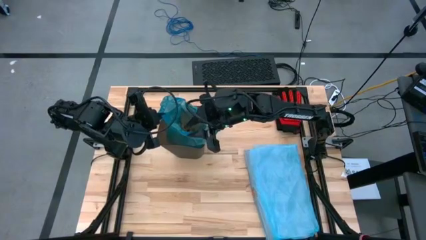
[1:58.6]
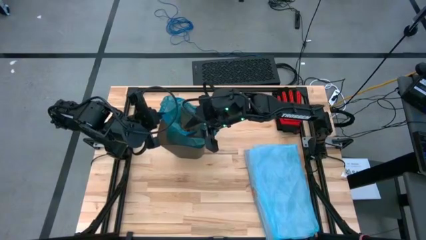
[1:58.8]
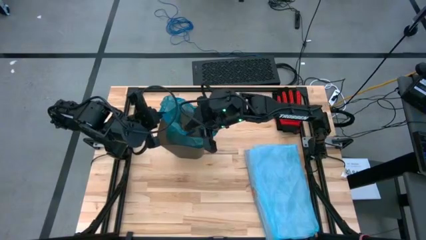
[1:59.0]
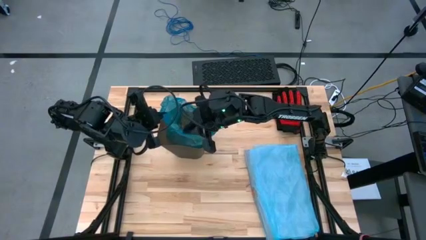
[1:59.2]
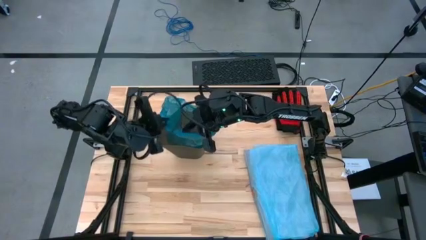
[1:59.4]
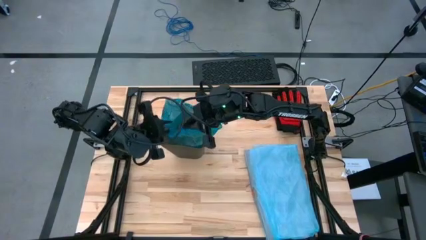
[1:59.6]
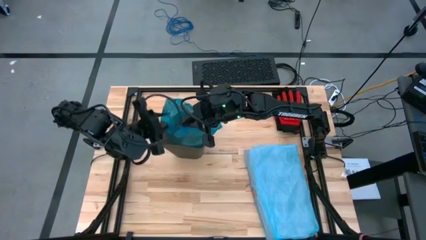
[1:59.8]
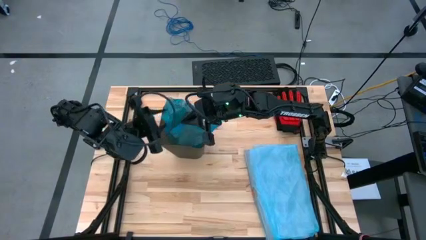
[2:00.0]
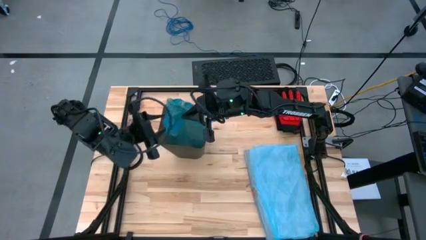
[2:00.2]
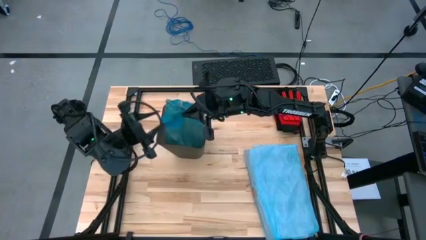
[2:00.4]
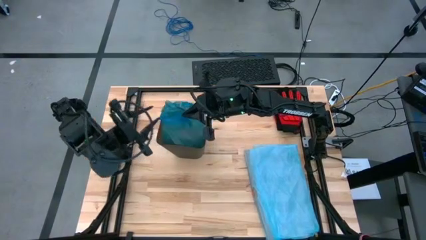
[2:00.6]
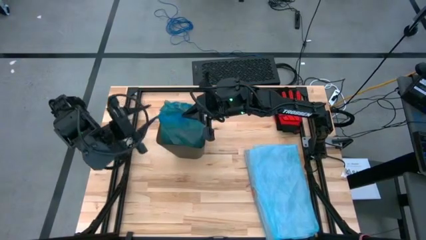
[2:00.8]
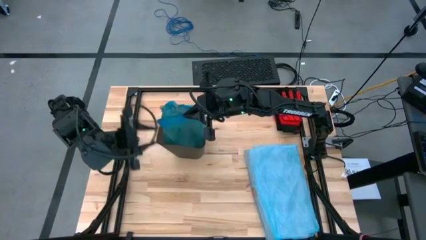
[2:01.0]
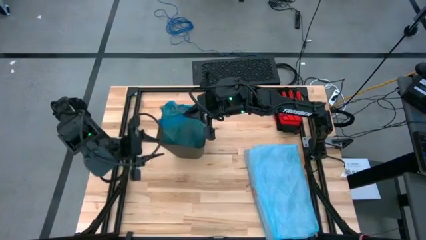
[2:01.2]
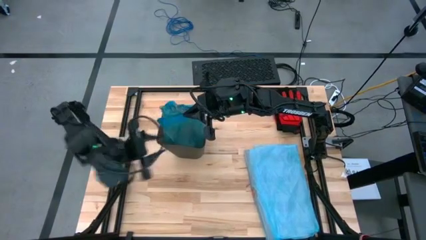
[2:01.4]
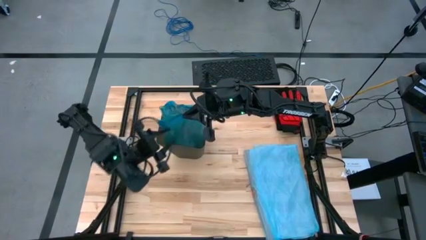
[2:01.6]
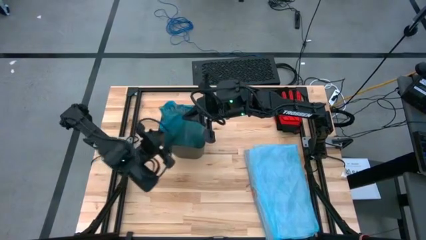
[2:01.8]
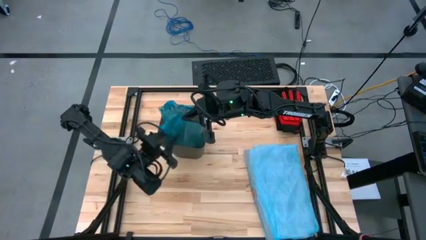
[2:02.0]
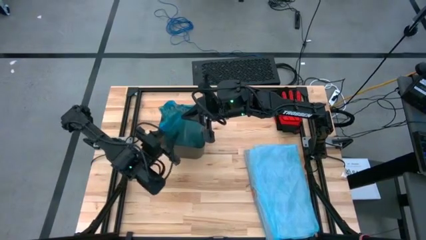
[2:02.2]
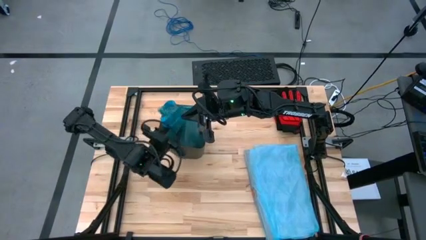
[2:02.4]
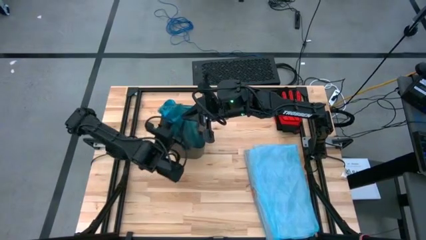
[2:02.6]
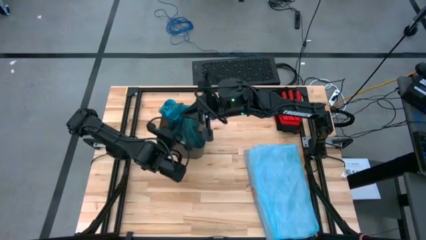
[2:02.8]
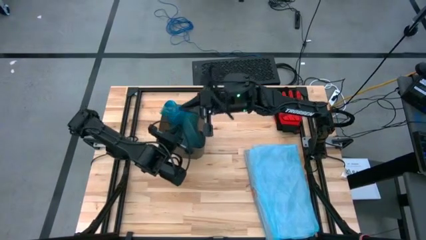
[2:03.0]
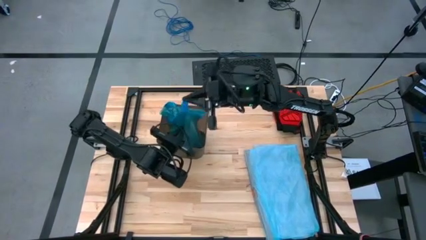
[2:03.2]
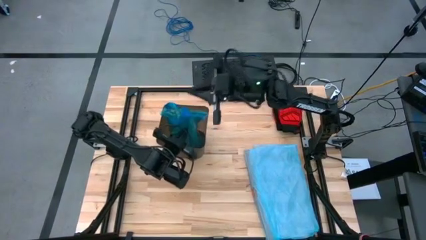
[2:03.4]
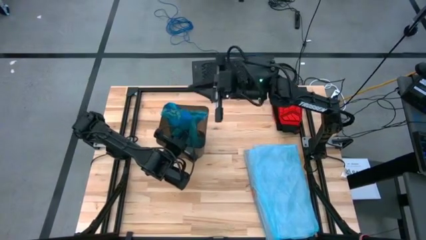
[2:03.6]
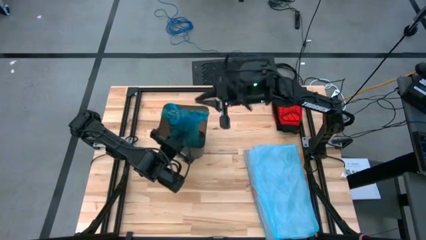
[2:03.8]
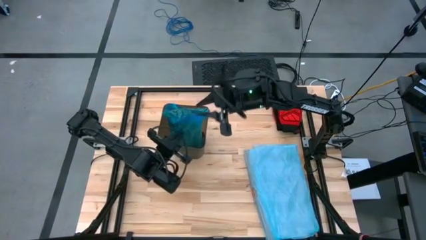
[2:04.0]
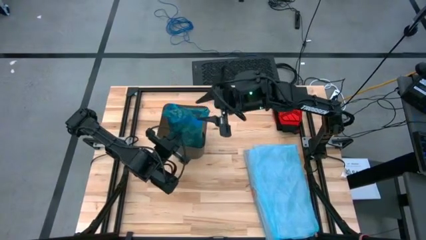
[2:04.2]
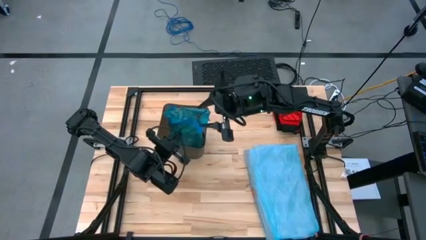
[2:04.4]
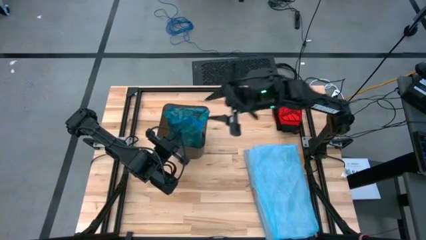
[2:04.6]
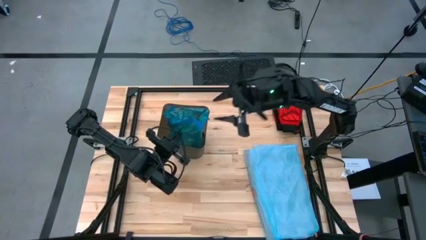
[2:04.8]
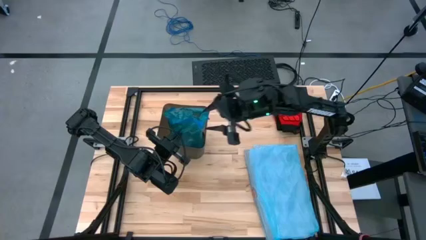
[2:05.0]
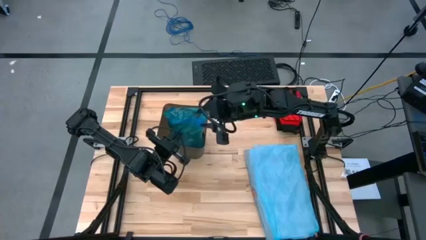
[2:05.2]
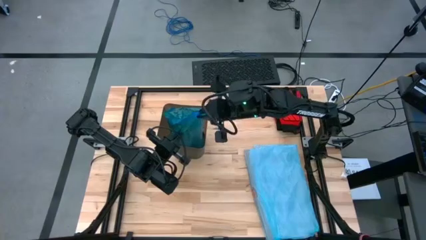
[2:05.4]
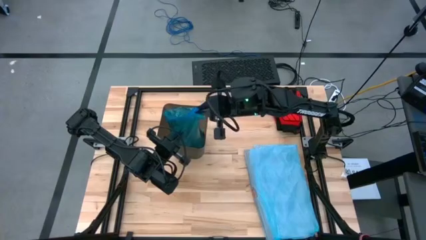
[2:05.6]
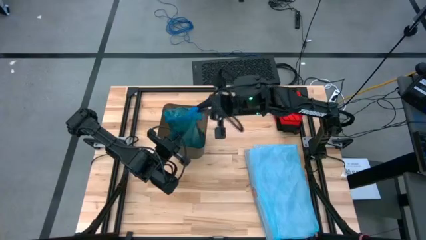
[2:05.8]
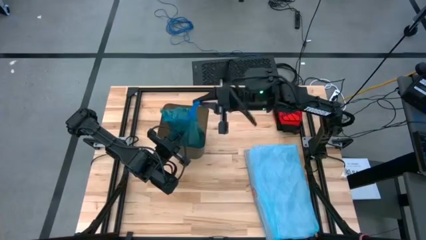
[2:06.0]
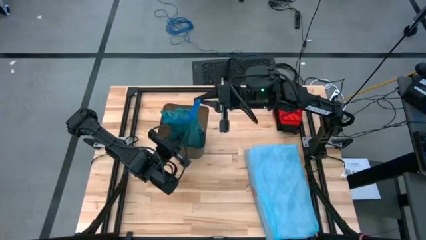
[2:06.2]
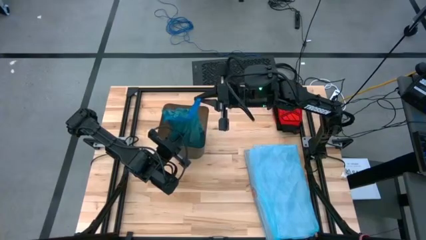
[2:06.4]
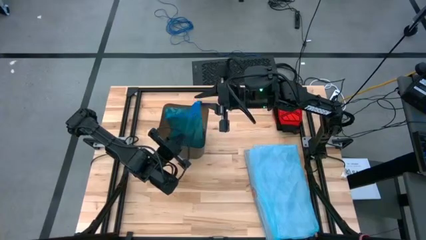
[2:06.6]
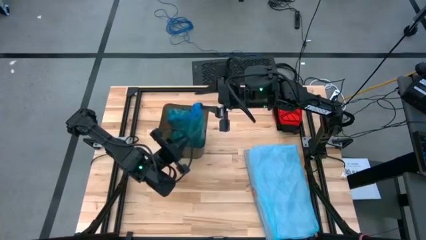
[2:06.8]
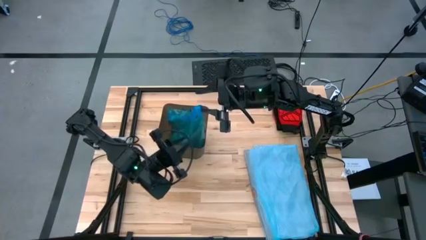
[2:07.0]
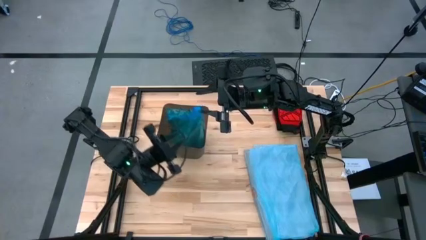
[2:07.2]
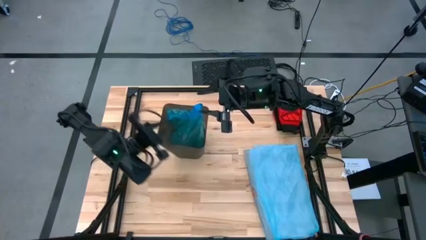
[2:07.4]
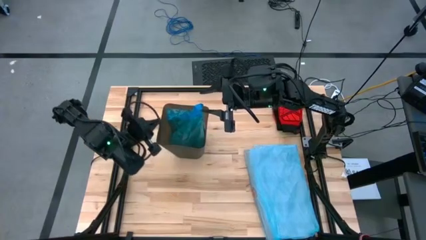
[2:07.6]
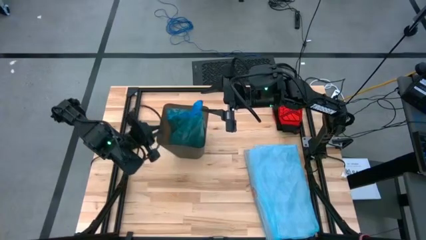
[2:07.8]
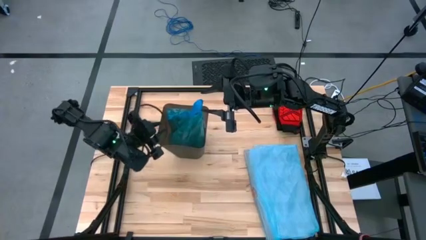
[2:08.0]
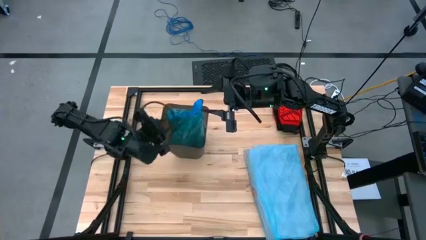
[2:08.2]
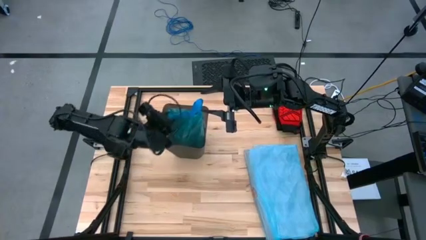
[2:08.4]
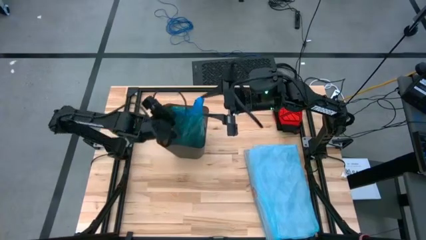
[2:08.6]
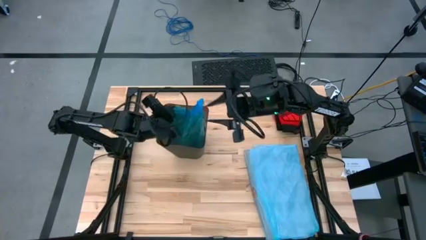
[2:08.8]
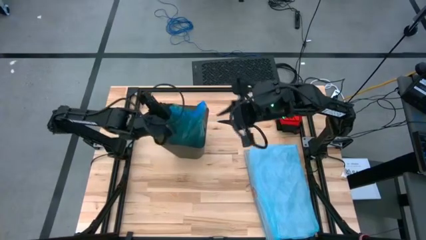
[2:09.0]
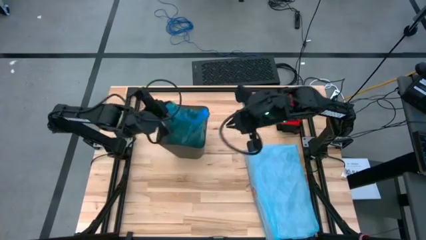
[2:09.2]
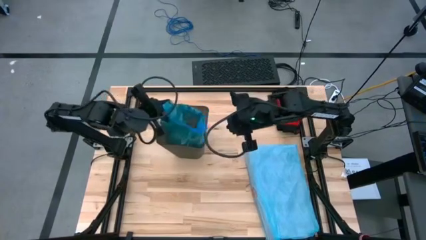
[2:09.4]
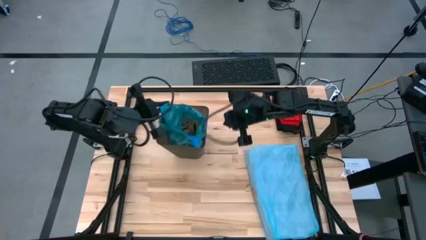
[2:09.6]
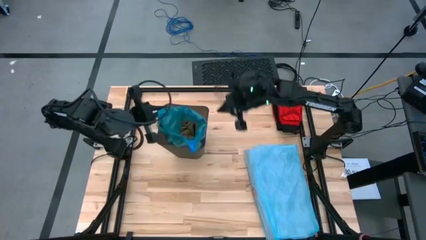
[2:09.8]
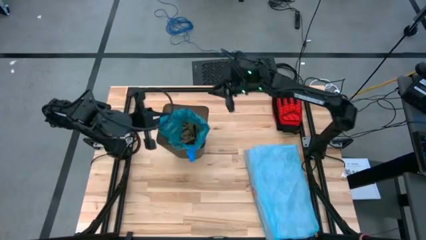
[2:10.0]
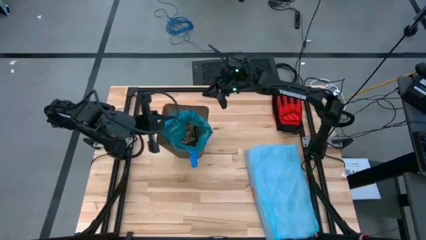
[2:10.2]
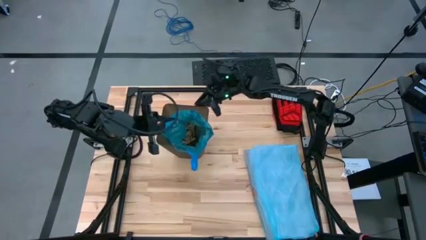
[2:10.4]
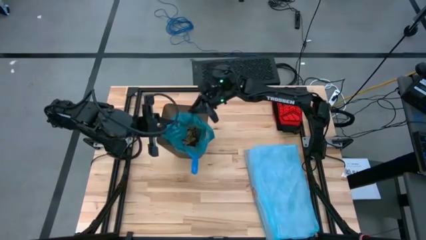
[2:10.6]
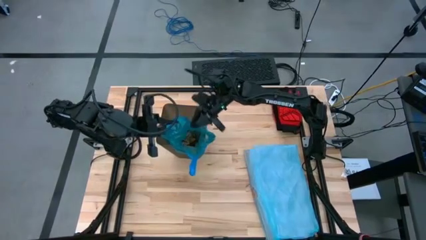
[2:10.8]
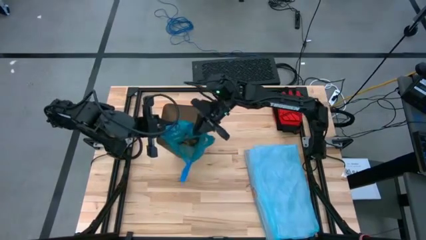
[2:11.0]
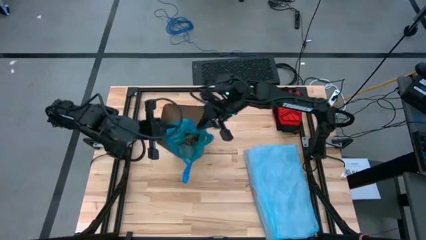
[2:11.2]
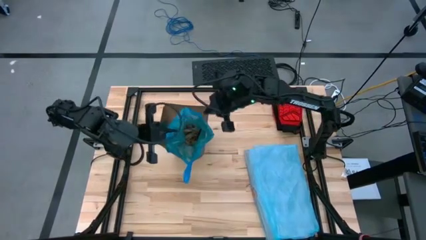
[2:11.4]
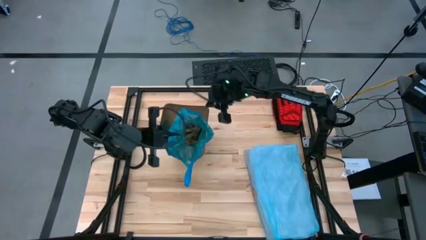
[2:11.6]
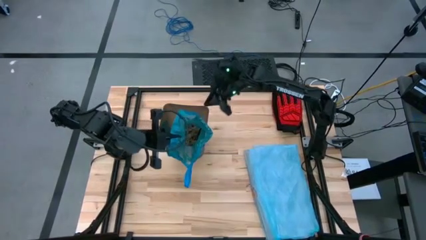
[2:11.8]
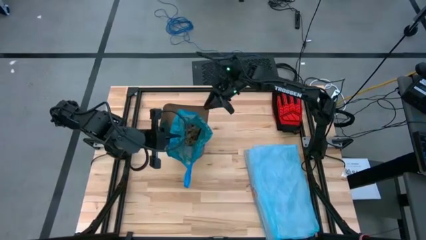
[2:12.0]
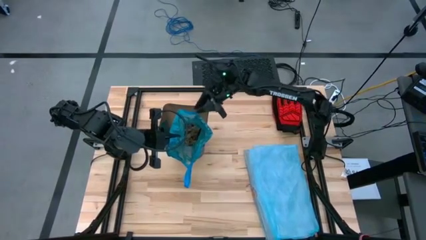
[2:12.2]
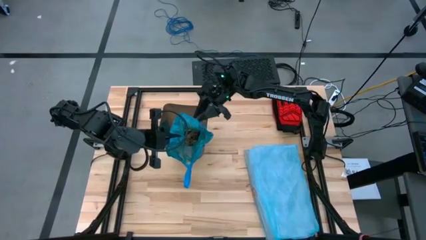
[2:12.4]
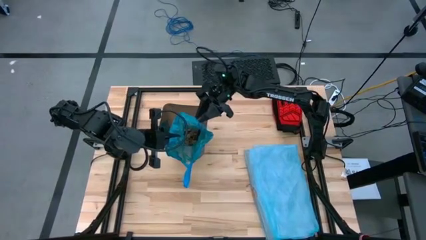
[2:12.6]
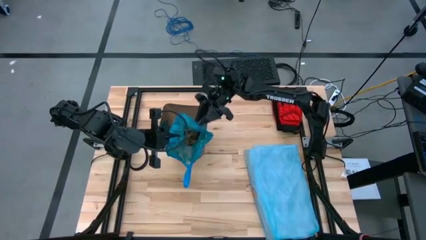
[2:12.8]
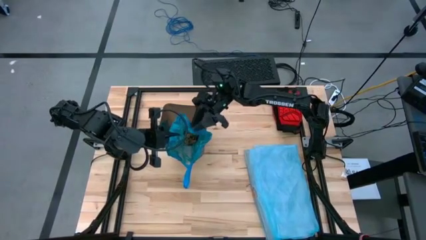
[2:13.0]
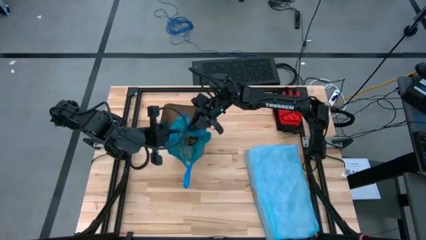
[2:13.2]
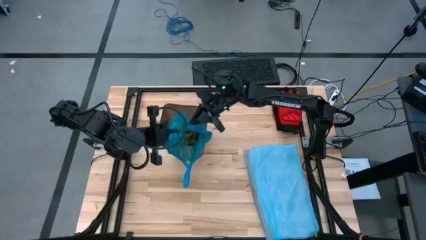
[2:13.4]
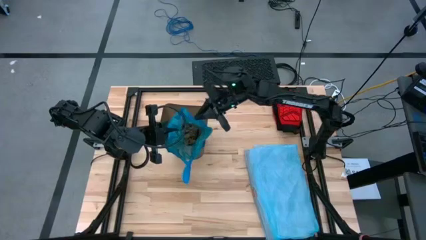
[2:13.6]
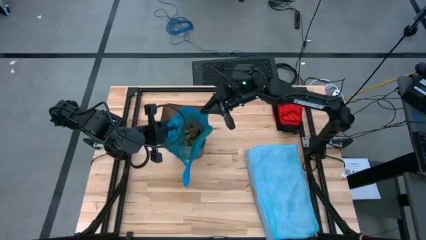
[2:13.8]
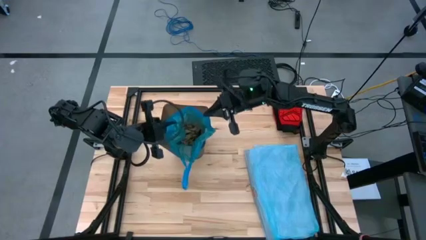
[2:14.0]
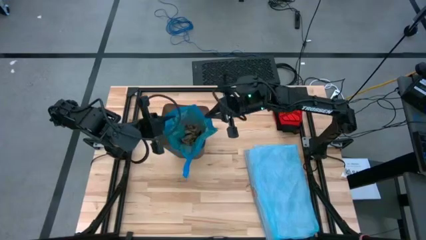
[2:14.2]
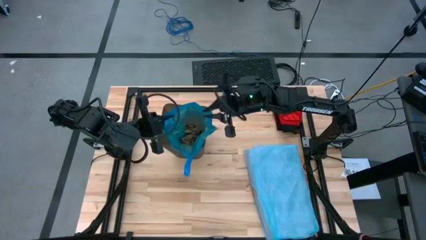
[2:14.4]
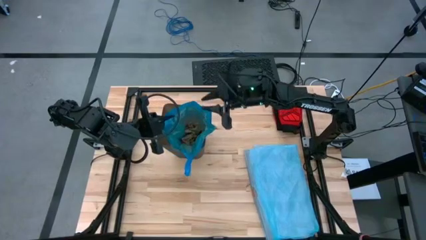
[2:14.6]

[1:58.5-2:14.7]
Task: place trash/remove bag and relplace
Remove the trash bag from the bin
